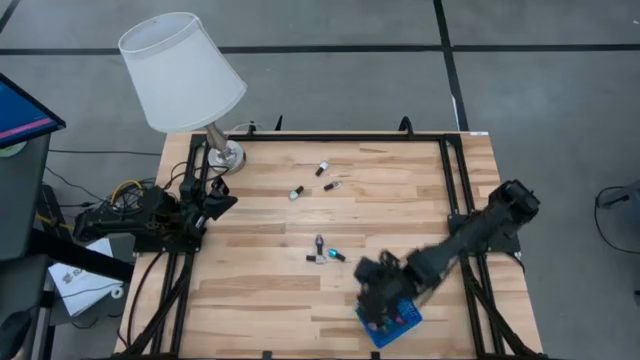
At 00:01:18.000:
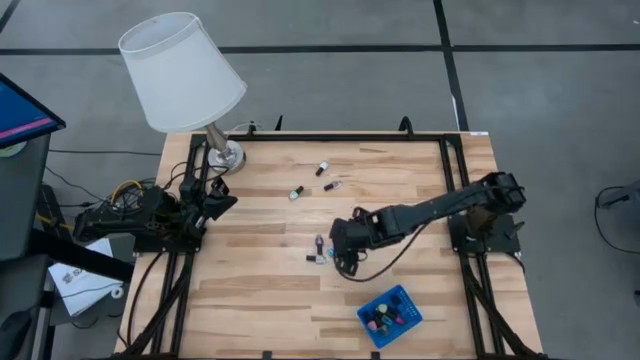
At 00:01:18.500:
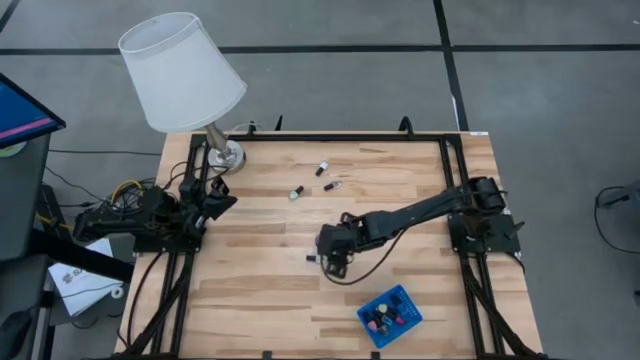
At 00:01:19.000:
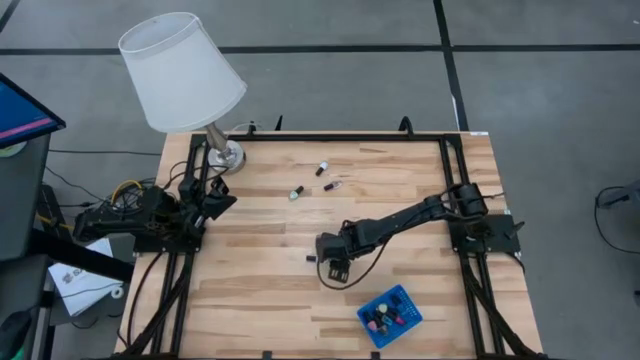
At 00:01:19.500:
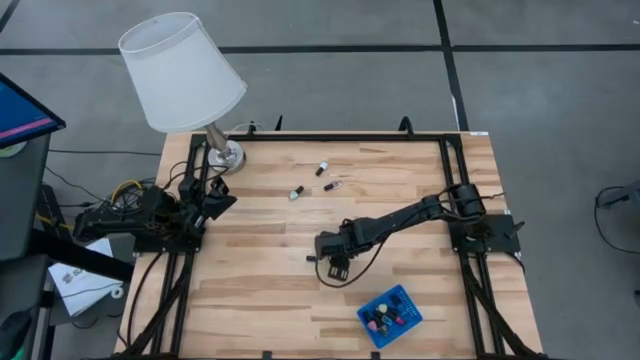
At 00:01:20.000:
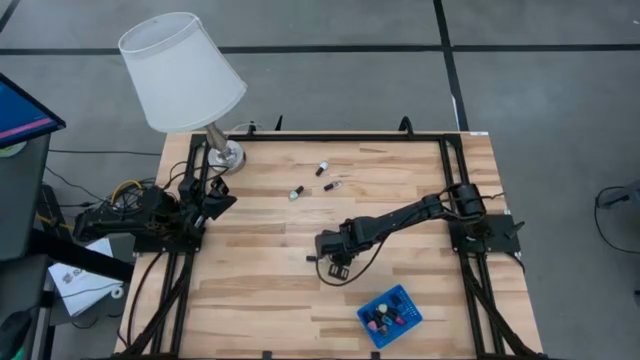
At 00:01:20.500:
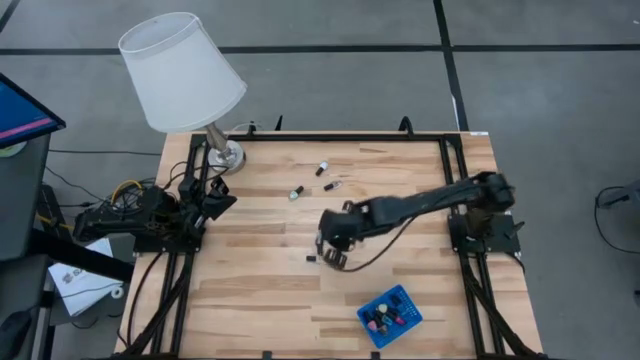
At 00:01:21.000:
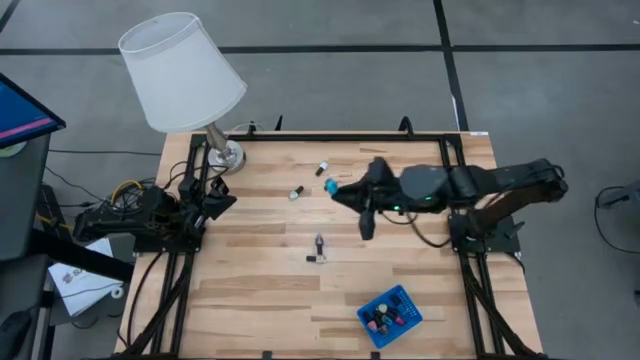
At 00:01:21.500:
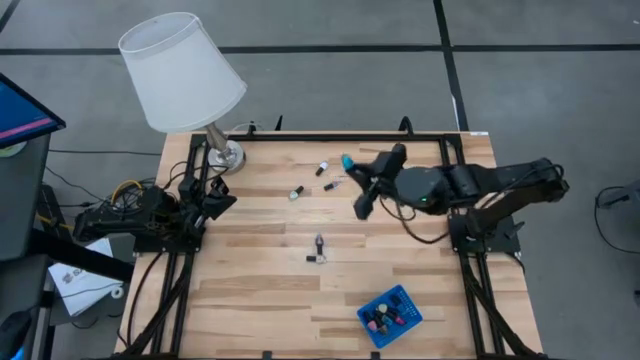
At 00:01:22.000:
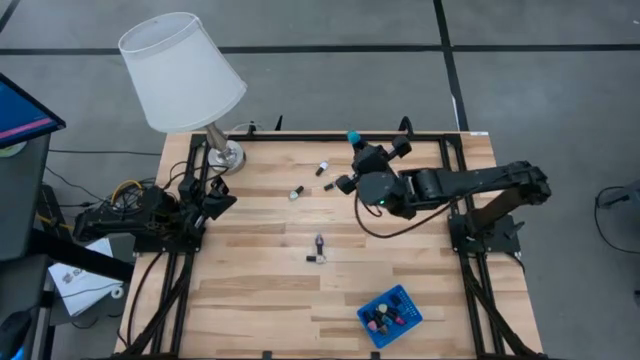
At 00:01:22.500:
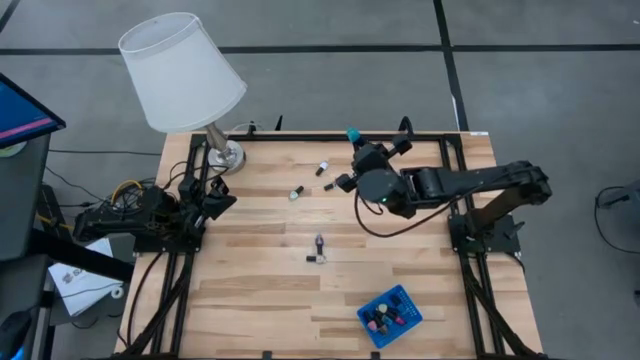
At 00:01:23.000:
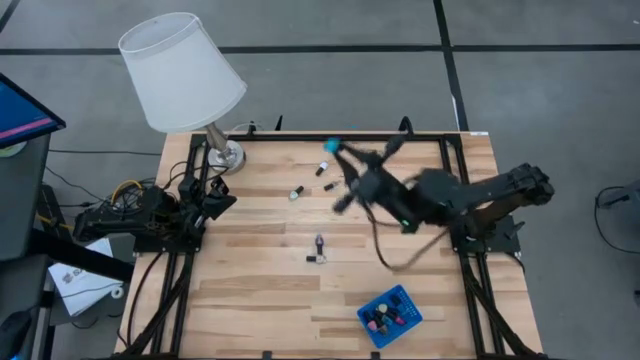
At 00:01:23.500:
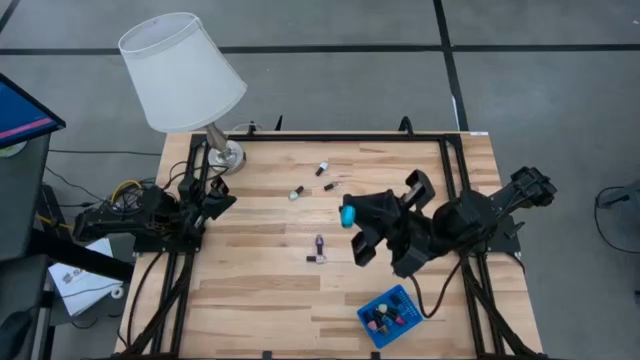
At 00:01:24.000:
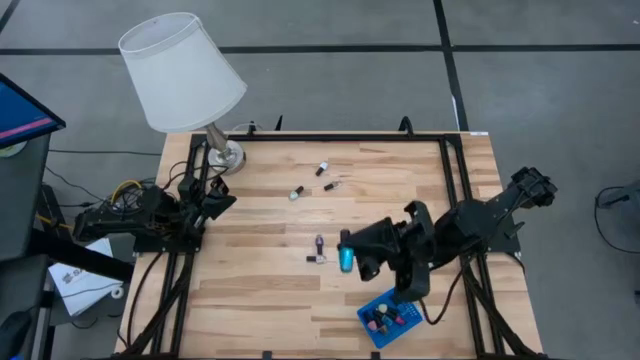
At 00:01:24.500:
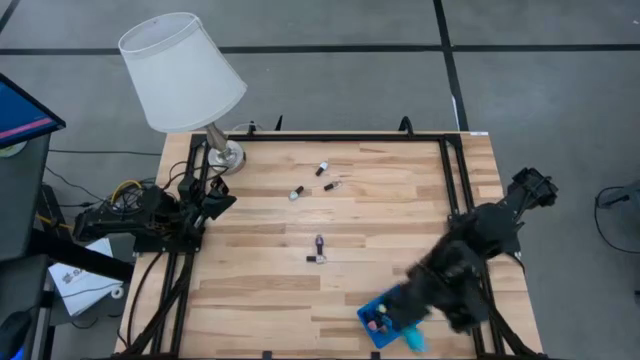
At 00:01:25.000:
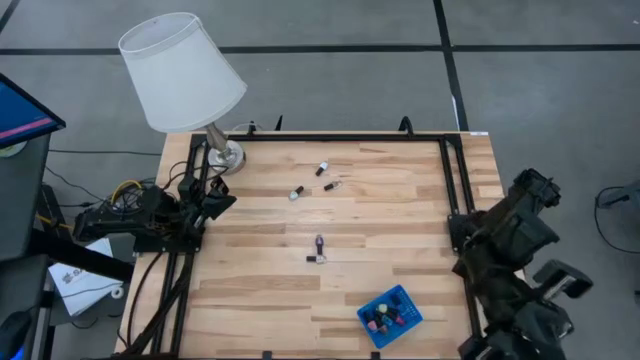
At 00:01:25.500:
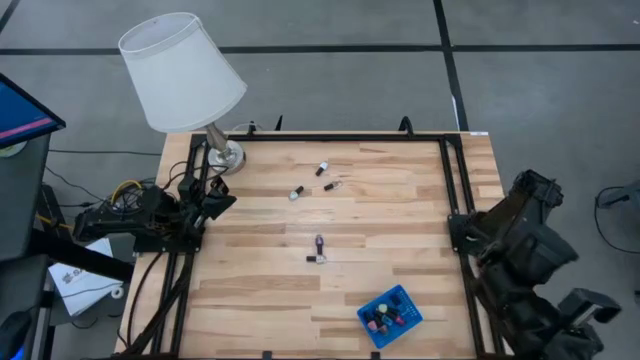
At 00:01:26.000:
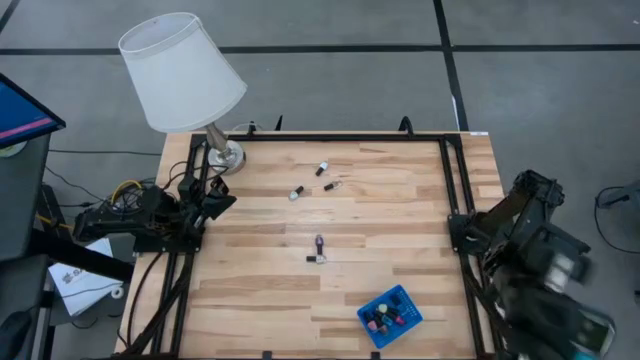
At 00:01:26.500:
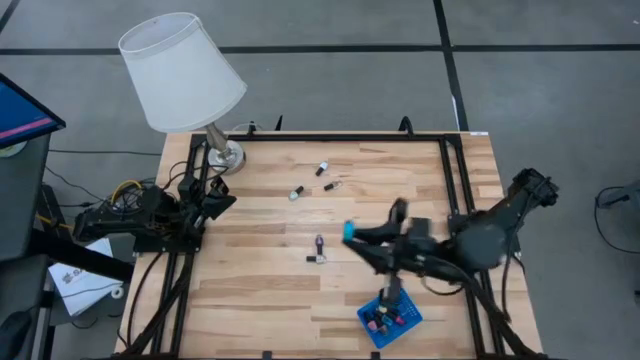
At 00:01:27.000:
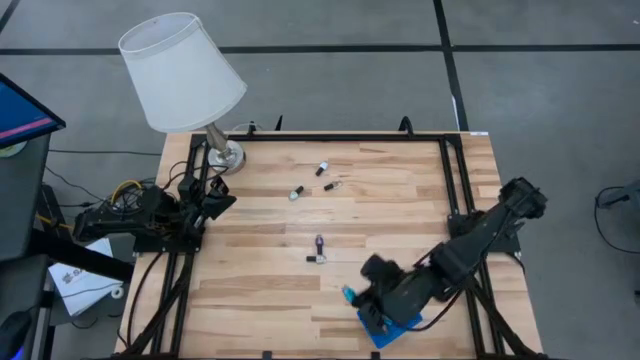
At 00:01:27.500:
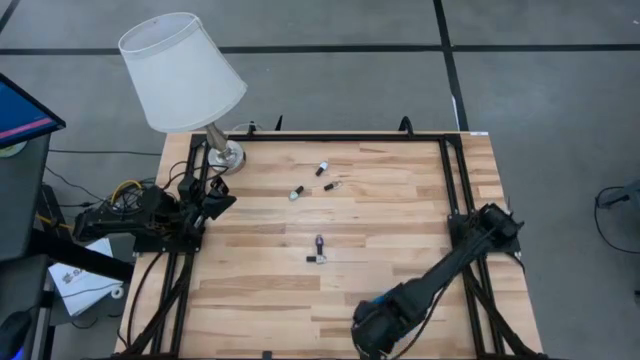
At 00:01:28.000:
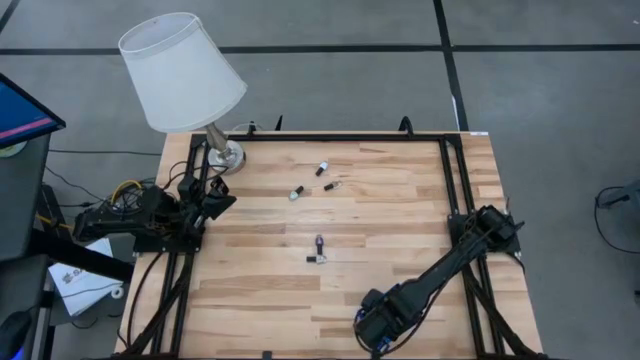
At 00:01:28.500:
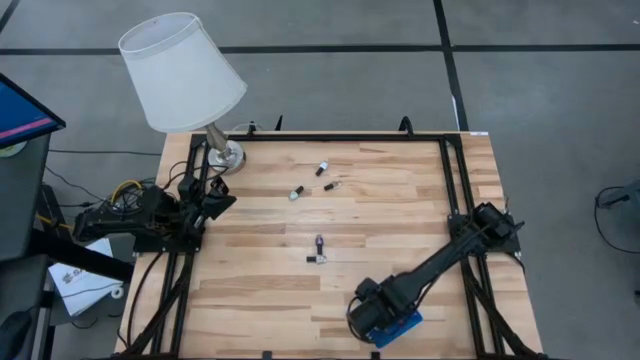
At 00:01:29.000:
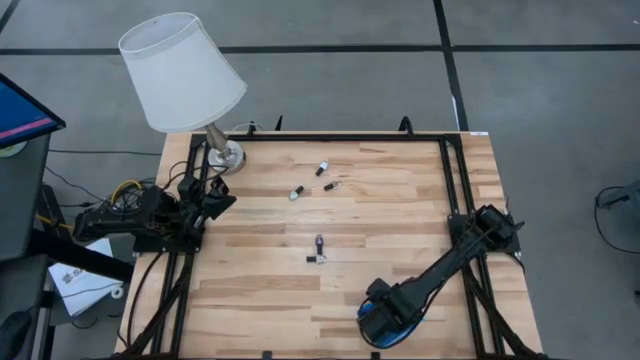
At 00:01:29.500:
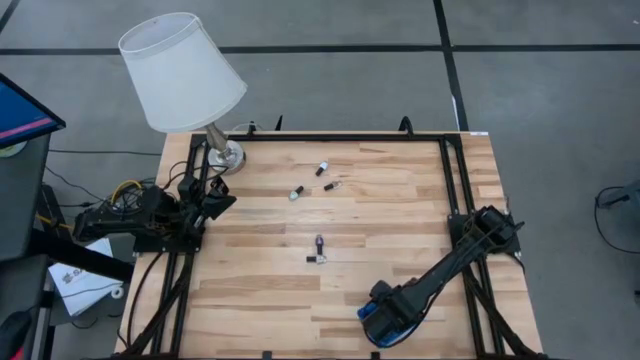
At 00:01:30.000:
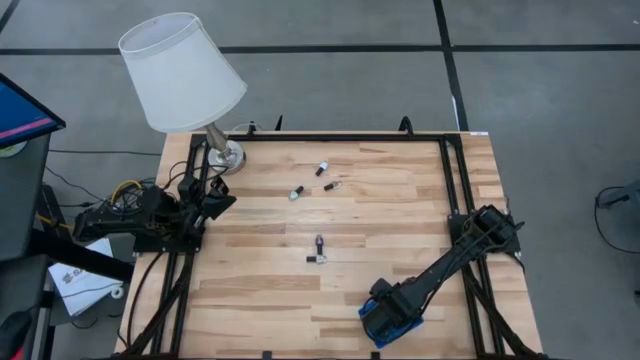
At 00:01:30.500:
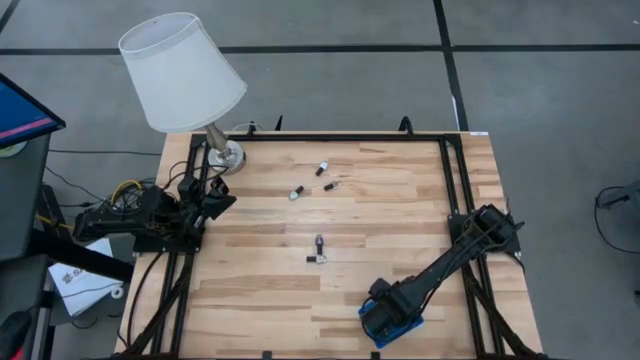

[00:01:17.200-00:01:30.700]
Task: Pick & Place Nail Polish
Put the light blue nail polish into the blue bin

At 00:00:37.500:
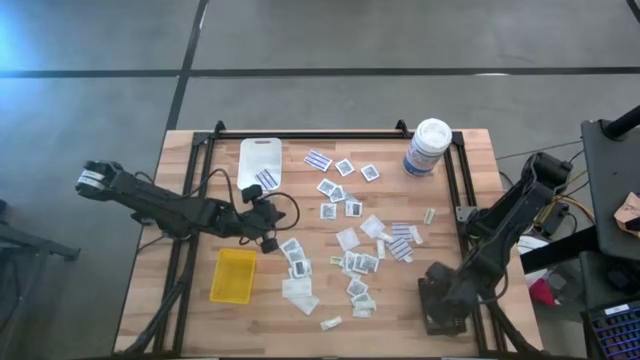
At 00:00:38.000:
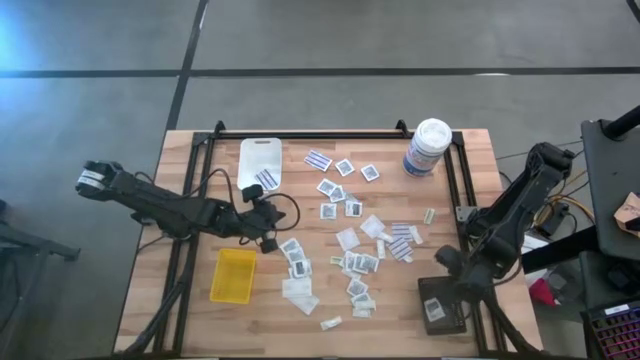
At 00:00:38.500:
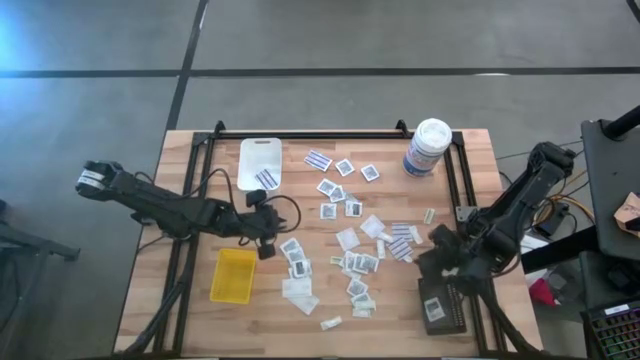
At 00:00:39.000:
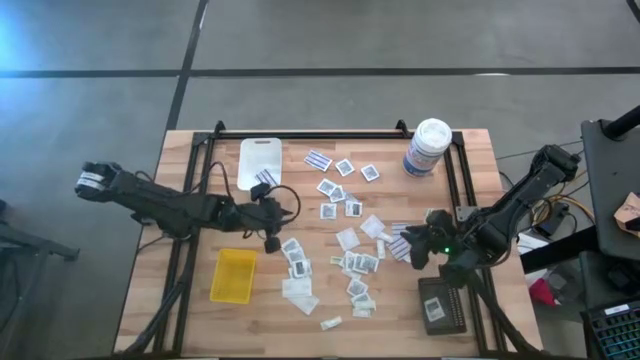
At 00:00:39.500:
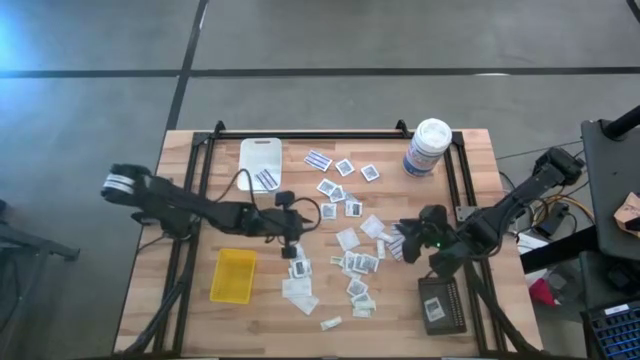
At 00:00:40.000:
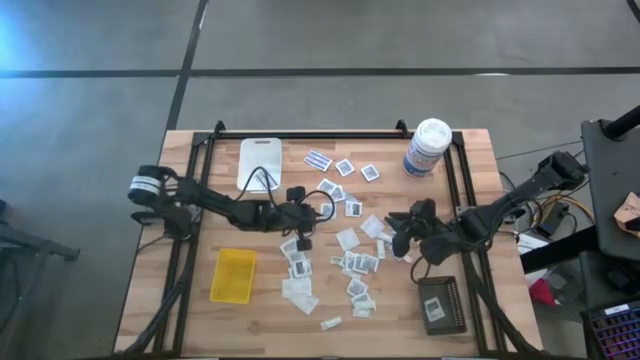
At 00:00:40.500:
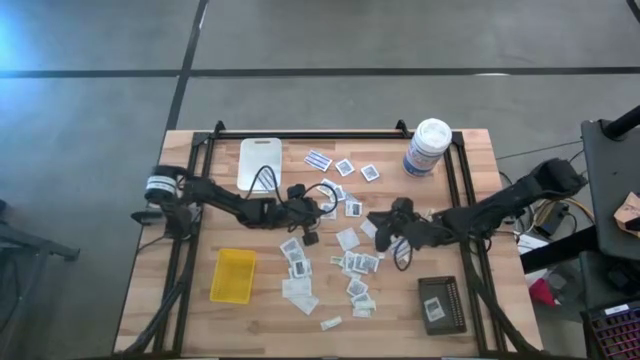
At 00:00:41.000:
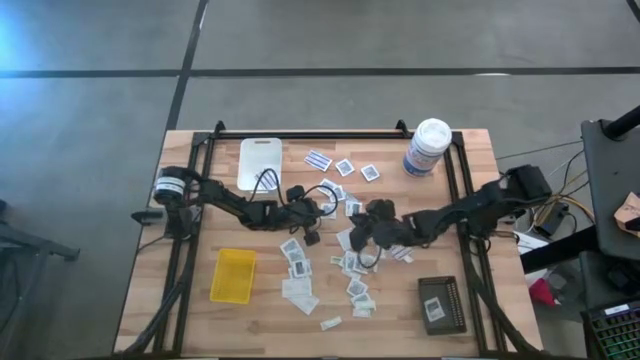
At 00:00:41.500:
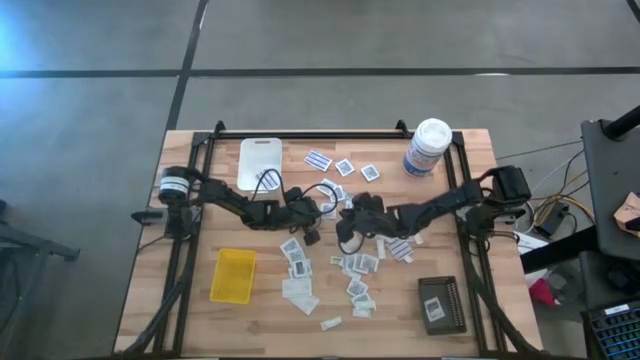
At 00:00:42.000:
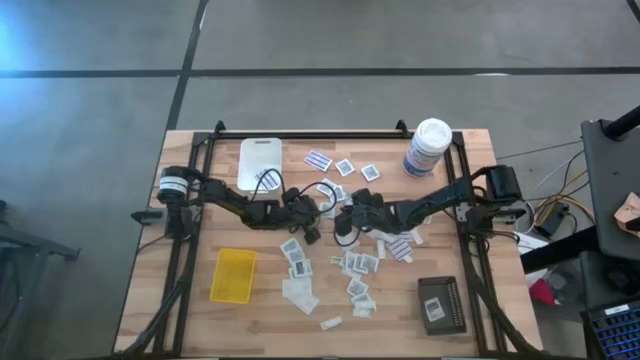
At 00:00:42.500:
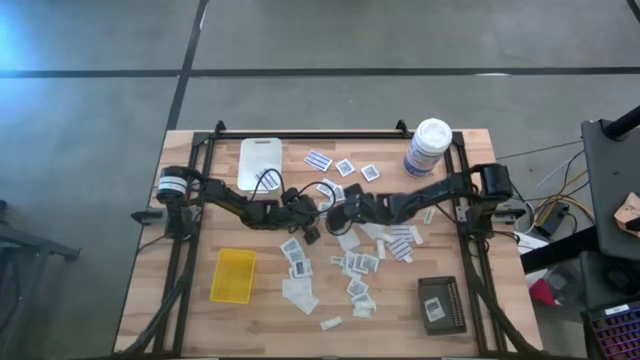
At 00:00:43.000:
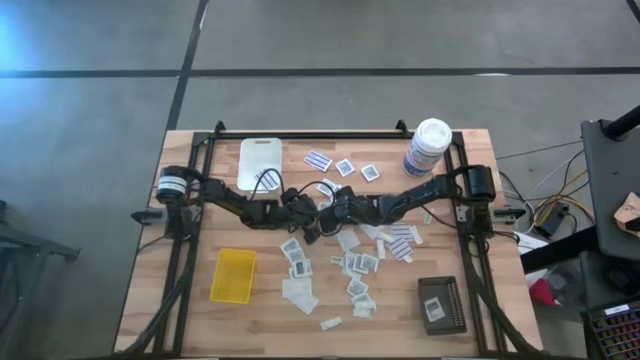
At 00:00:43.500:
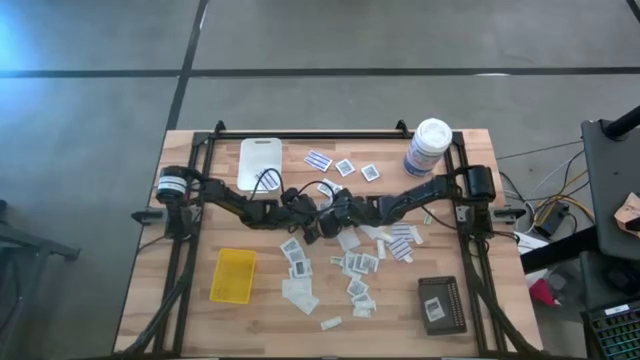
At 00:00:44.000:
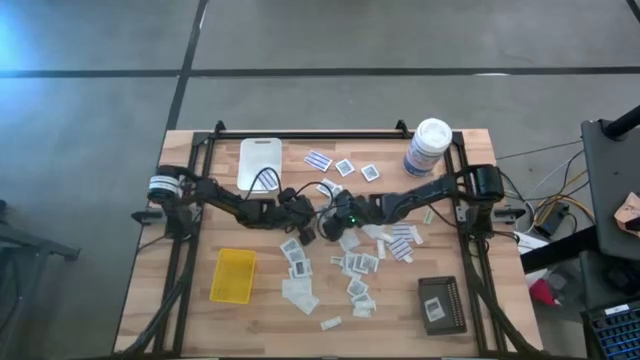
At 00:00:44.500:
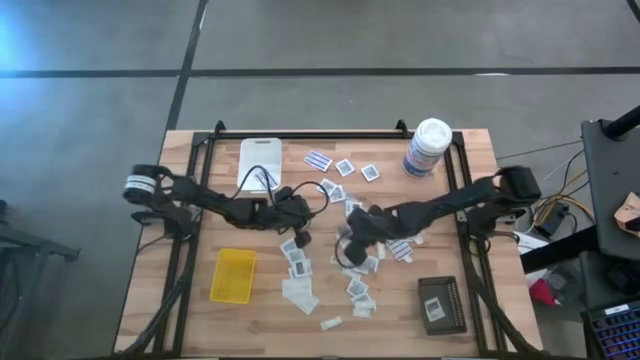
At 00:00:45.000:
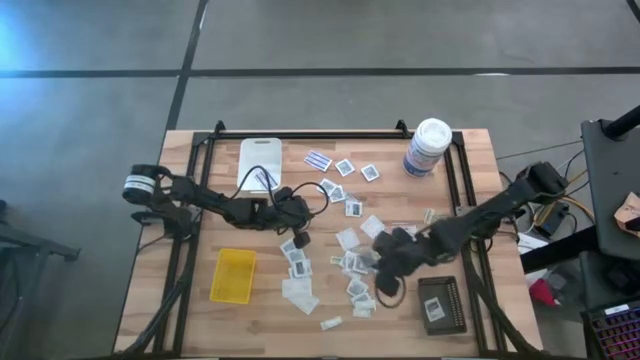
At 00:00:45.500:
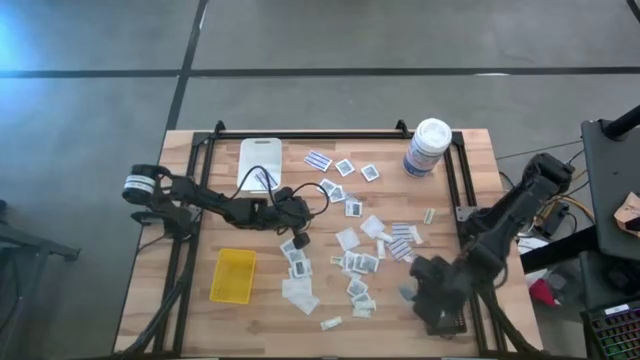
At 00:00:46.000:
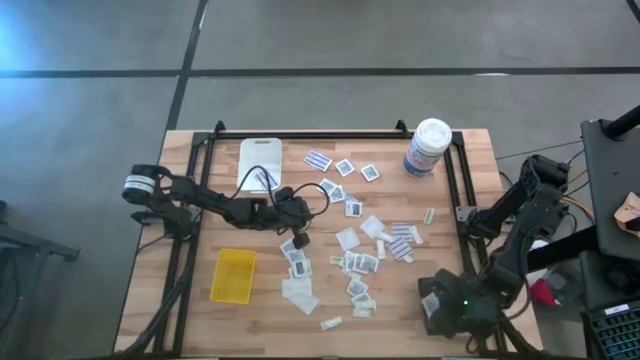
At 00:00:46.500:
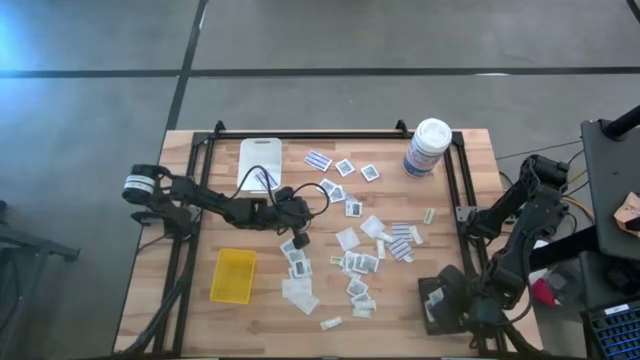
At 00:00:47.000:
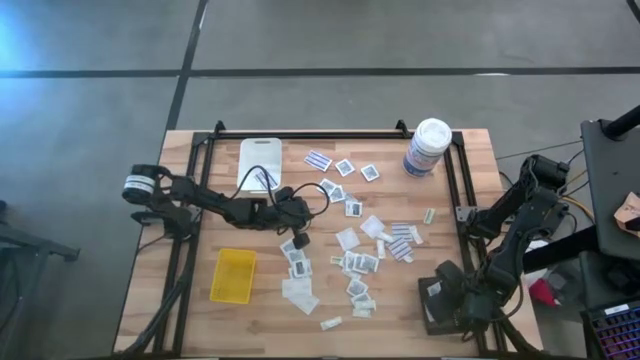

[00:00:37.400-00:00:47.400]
Task: Pick & Place First Aid Supplies
Put the towelette pack into the black bin
